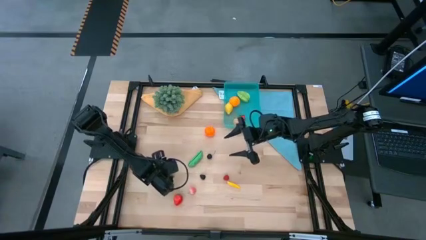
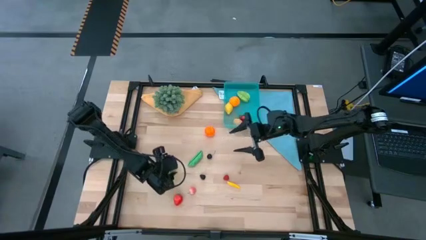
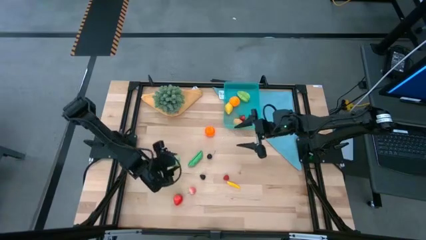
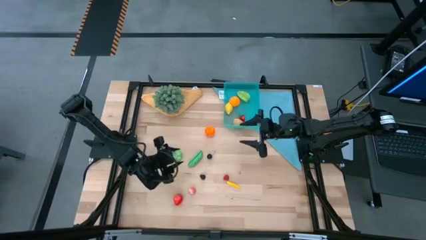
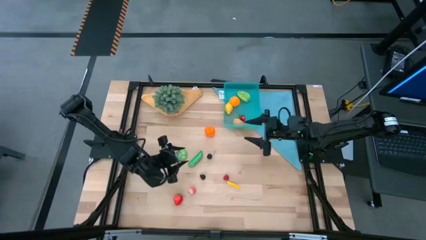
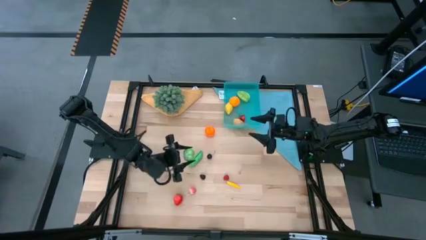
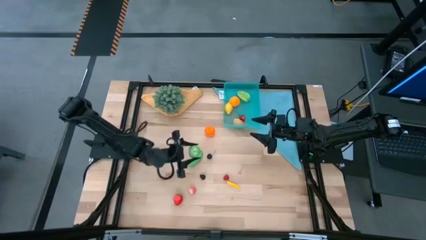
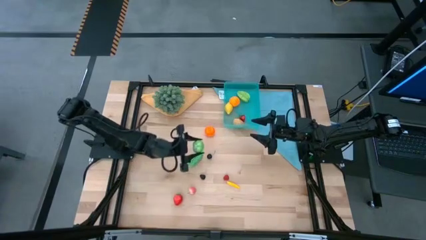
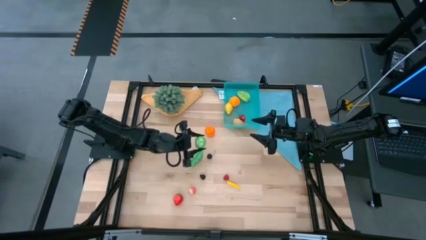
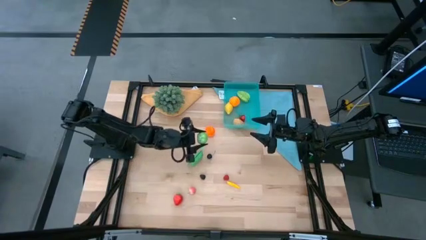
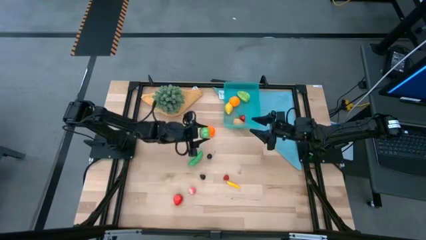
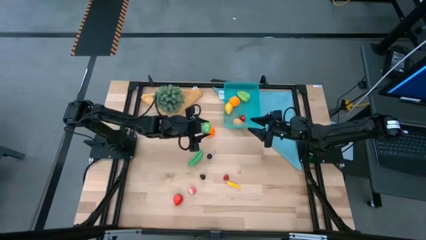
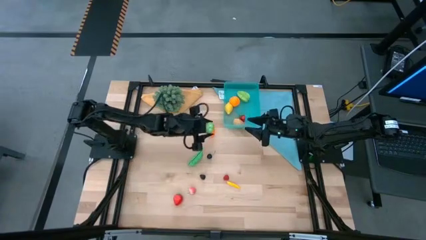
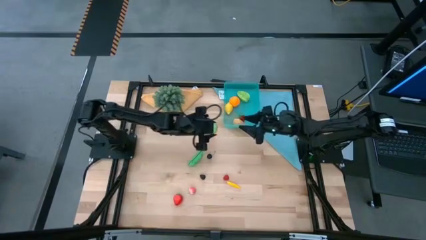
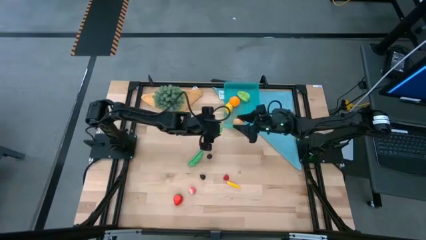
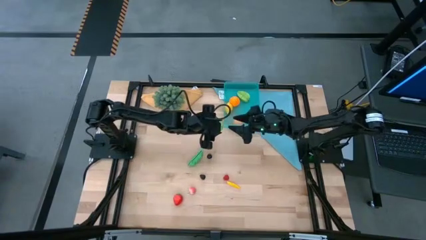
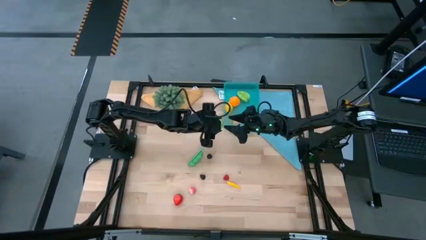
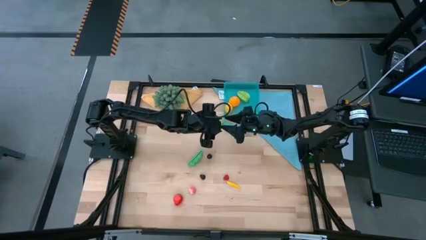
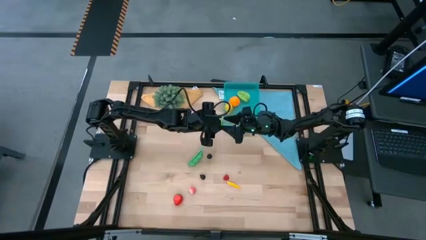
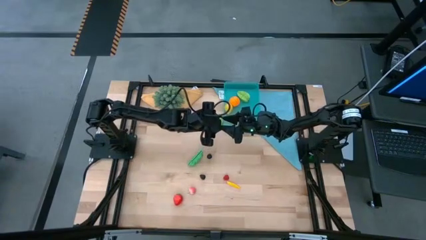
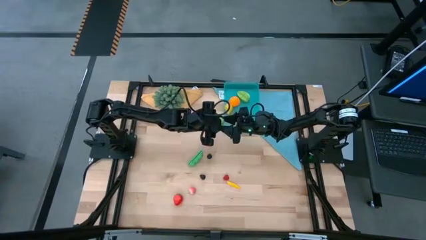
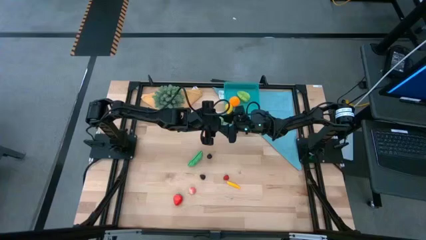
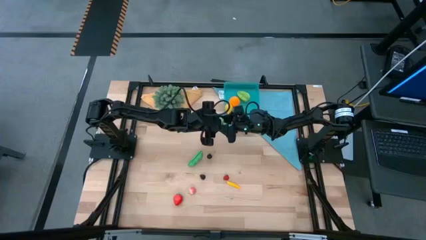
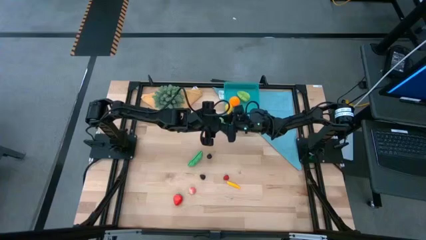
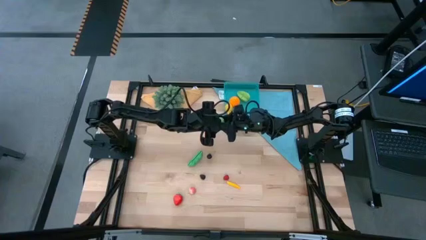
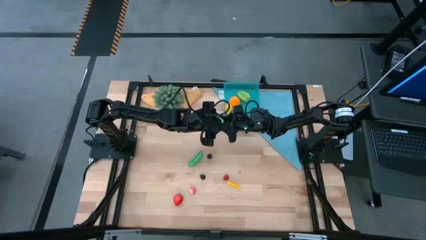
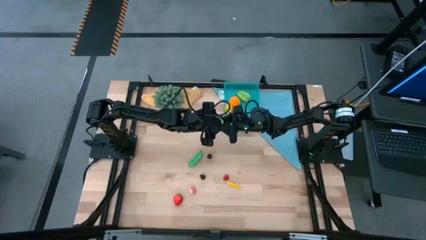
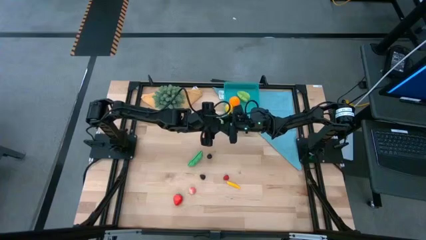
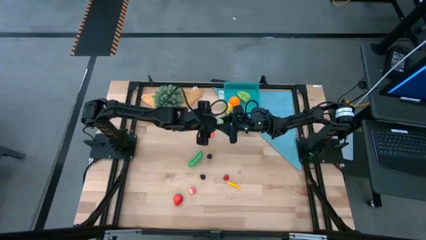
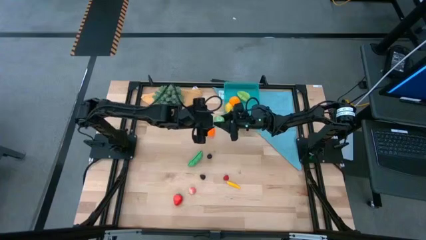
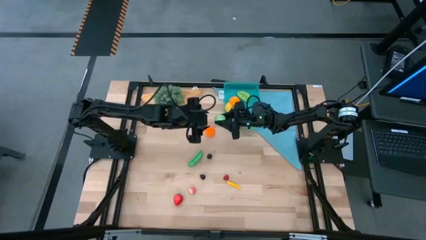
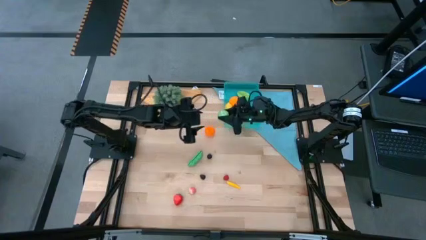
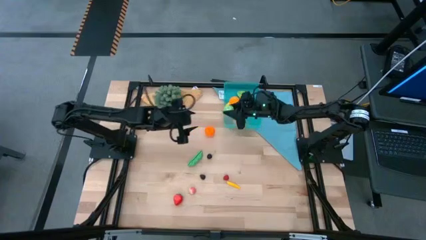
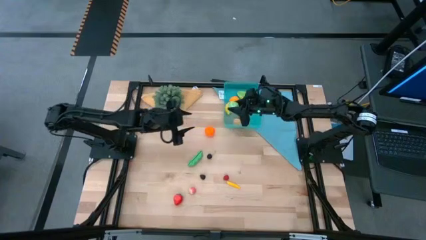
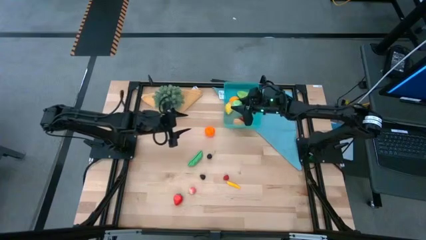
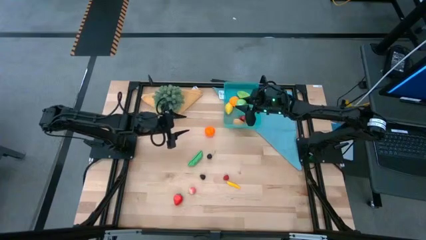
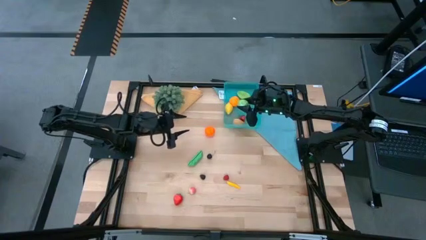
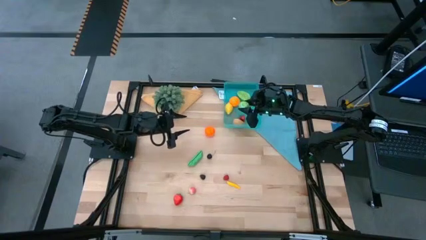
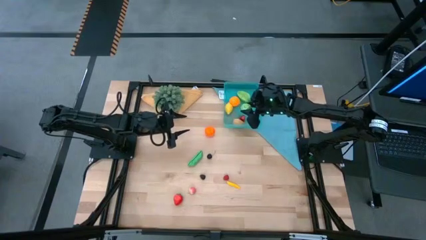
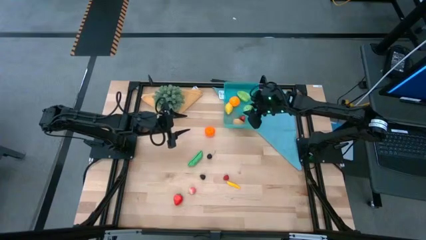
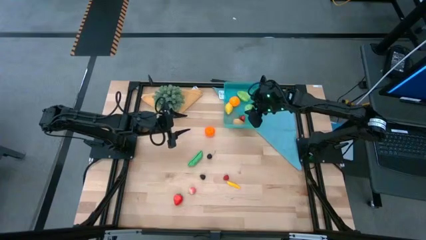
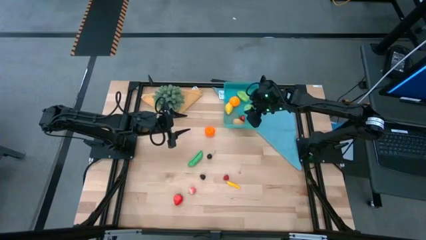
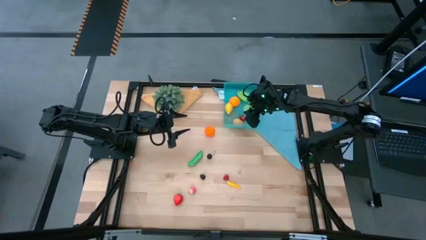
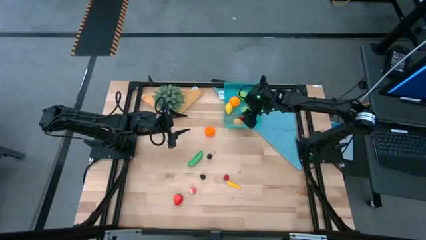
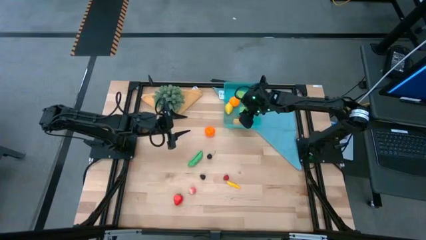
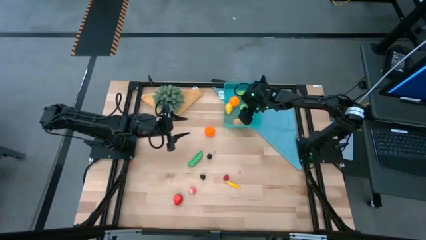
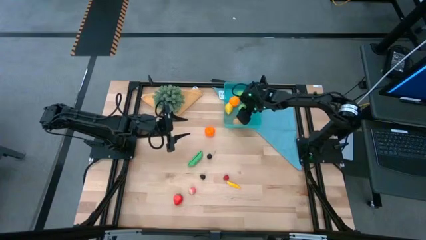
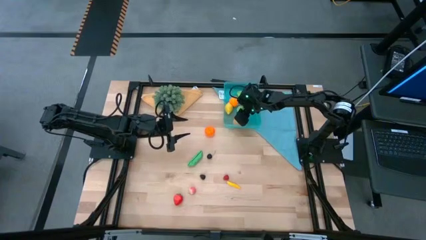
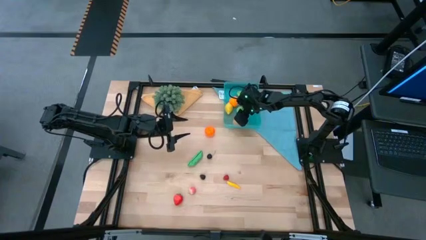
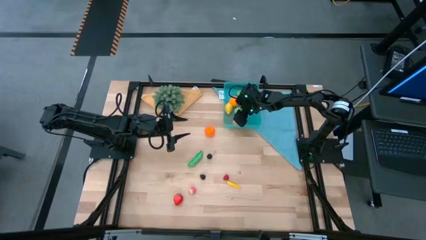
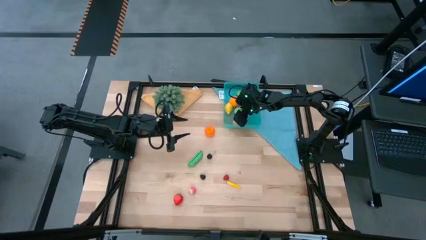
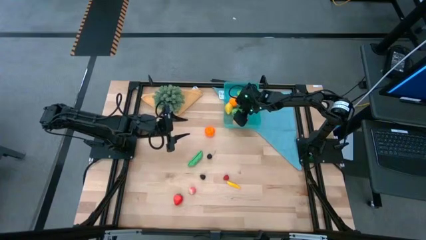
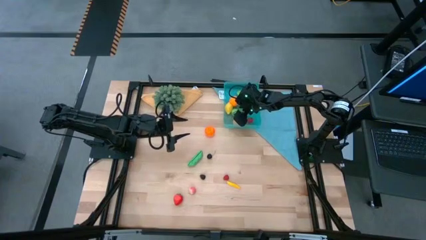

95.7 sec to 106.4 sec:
Task: Pick and placing Produce into tupperware
Put the green cabbage into the blue bin

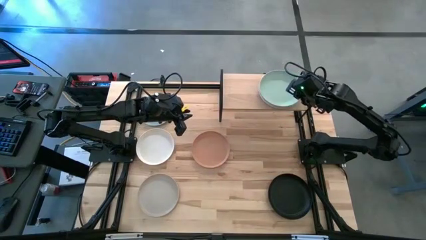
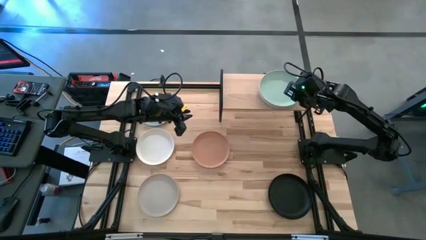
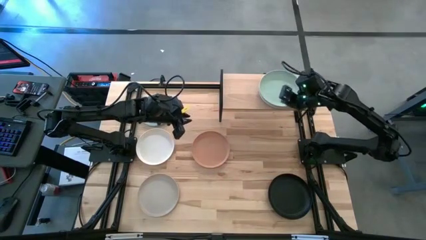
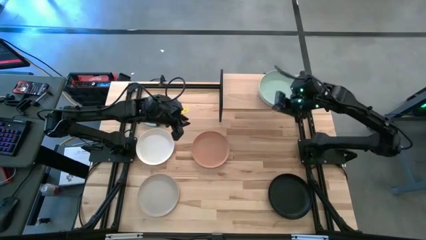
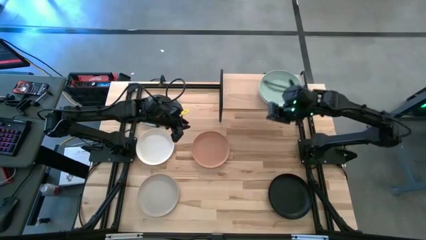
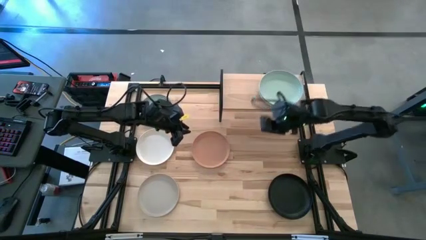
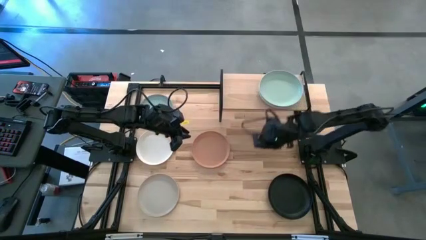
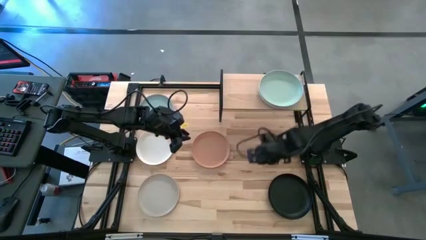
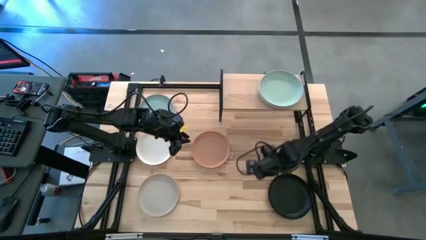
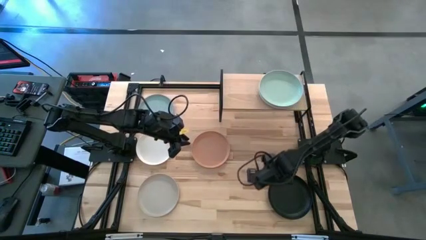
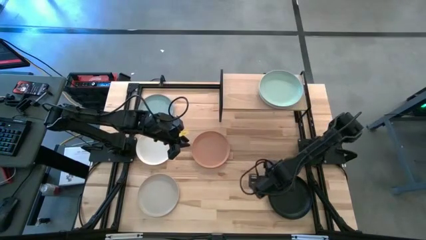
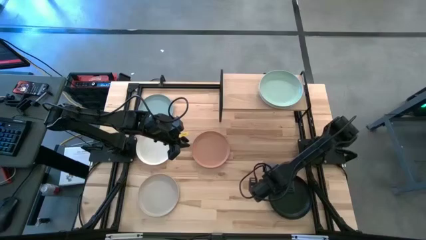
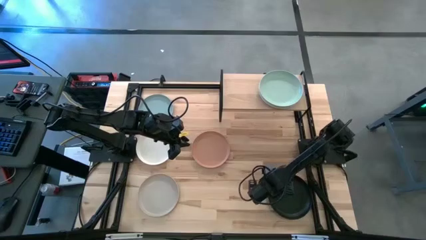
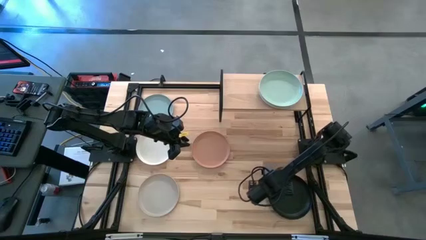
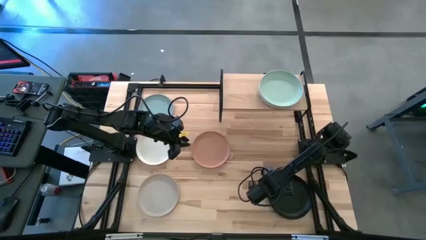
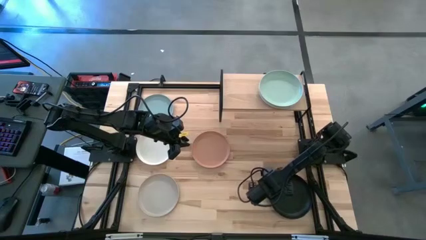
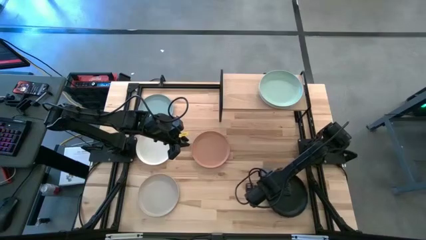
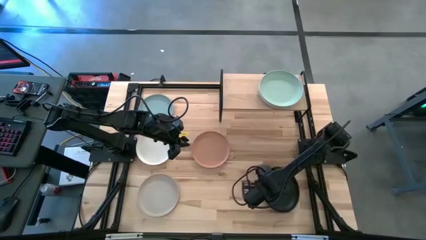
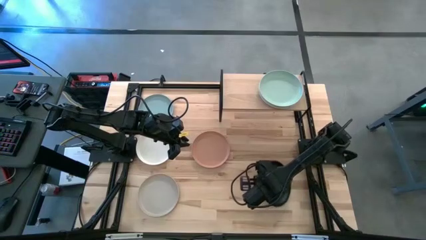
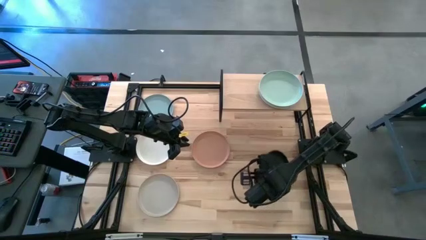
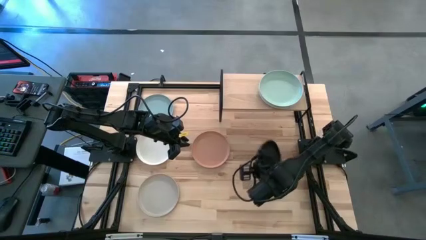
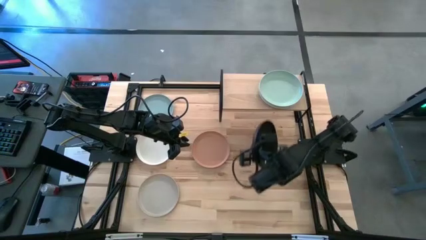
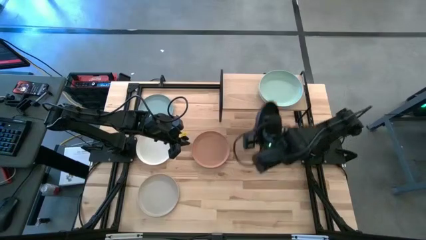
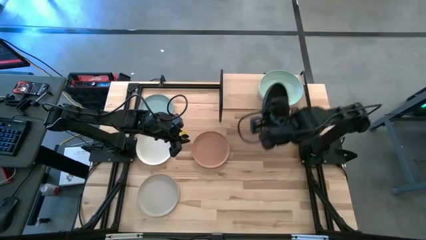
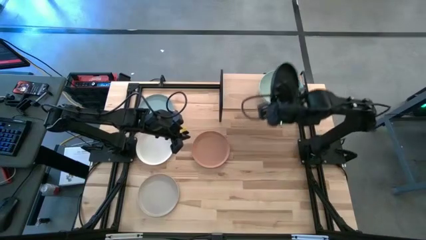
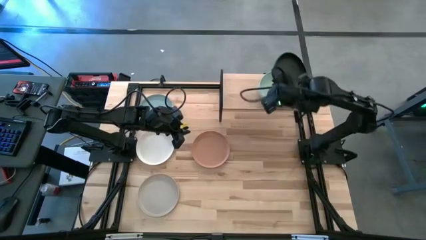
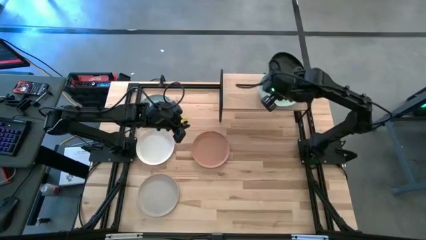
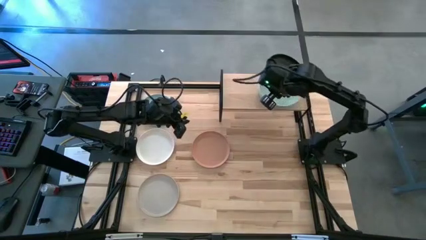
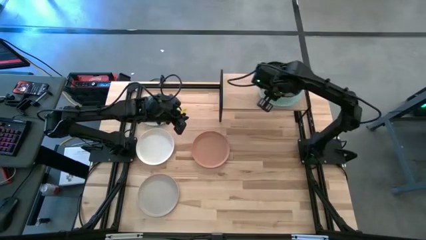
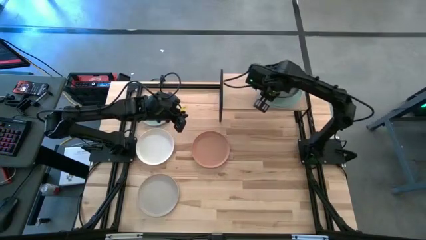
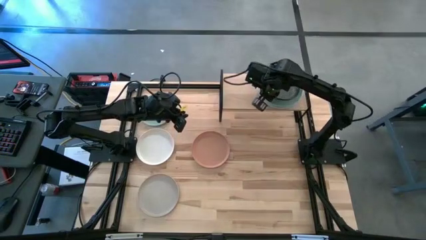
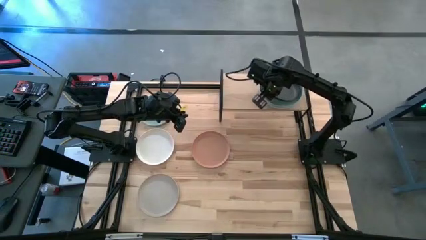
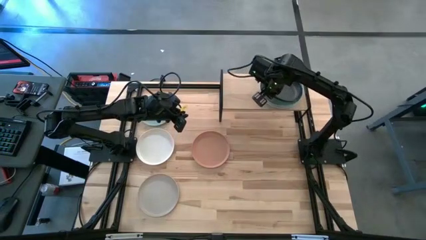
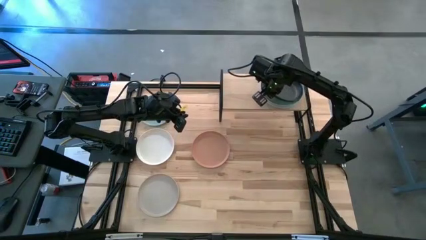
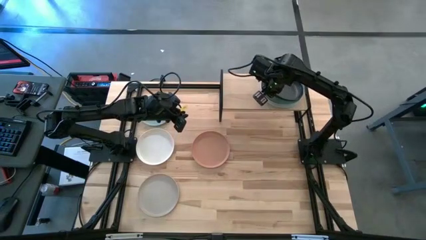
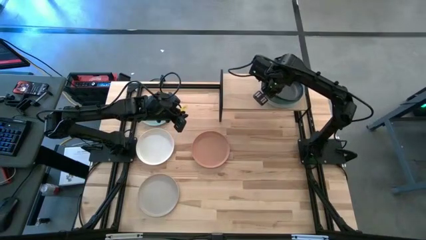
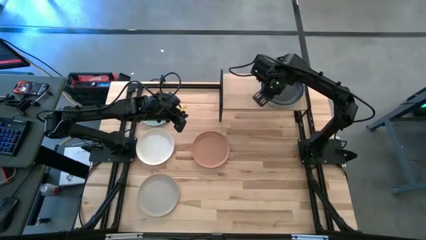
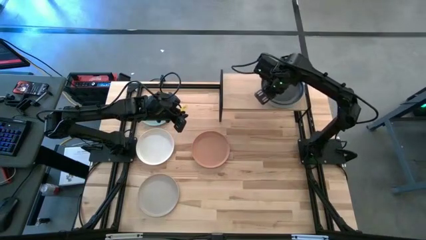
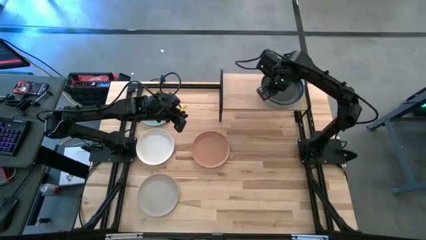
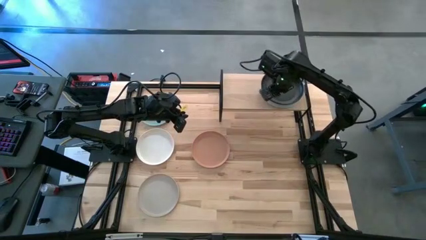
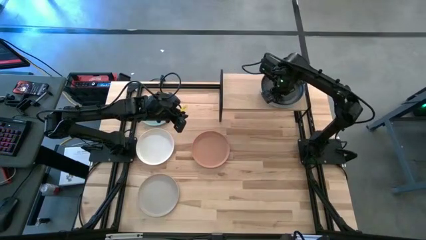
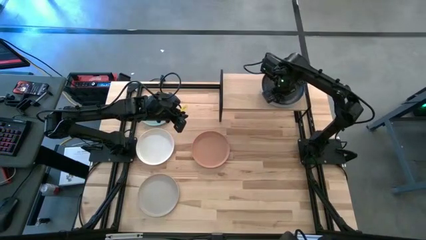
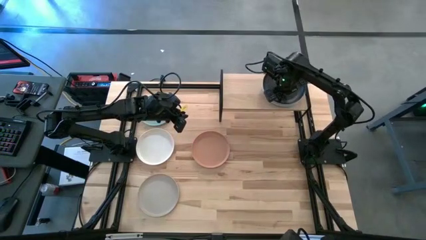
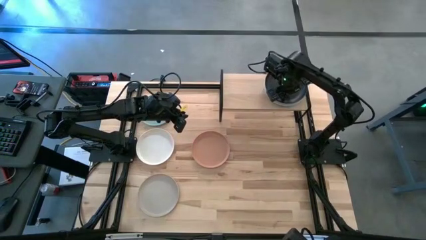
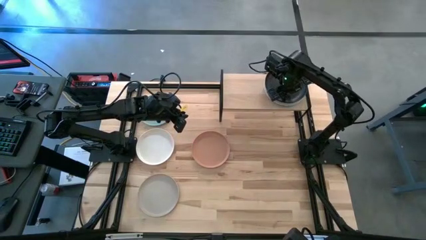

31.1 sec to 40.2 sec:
Task: Place and stack plates onto a shelf
Stack the black plate on top of the green plate on the shelf
